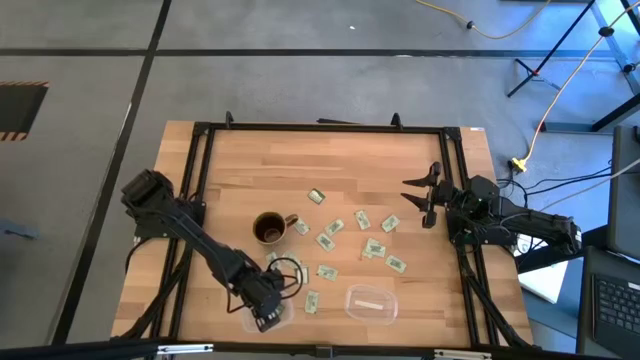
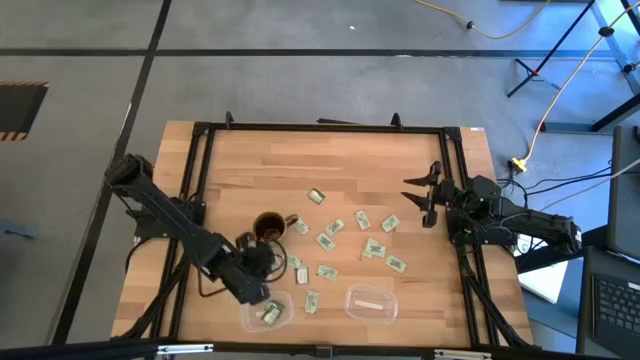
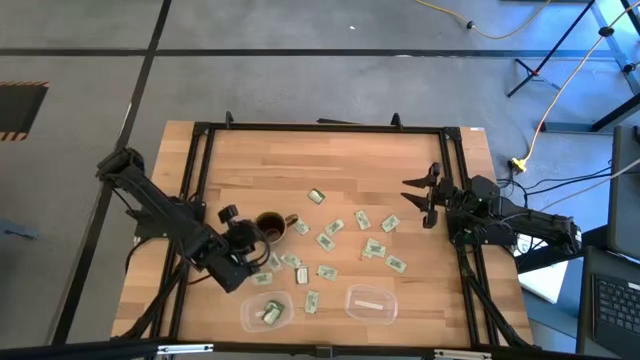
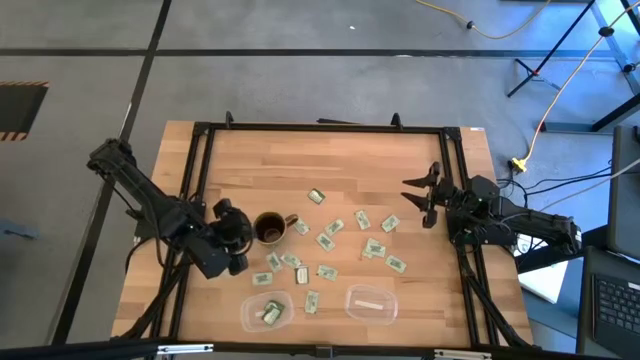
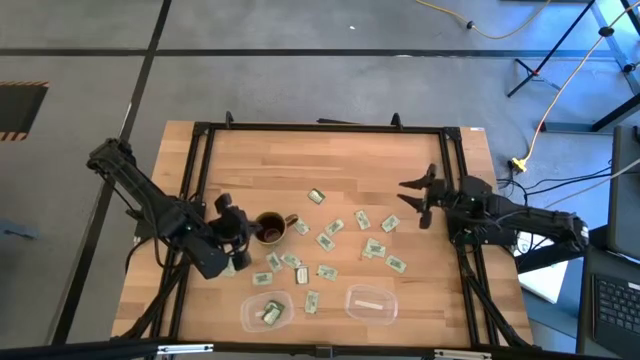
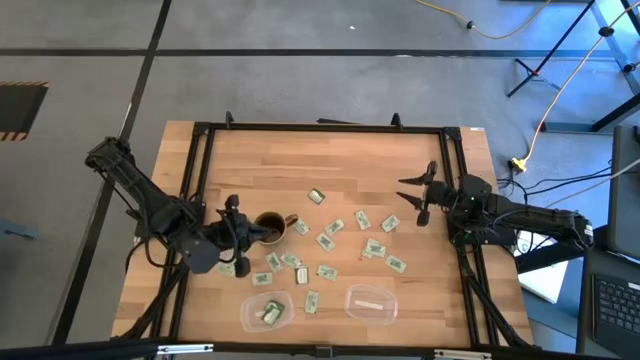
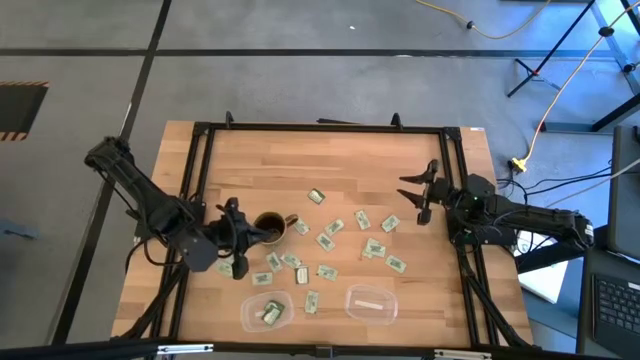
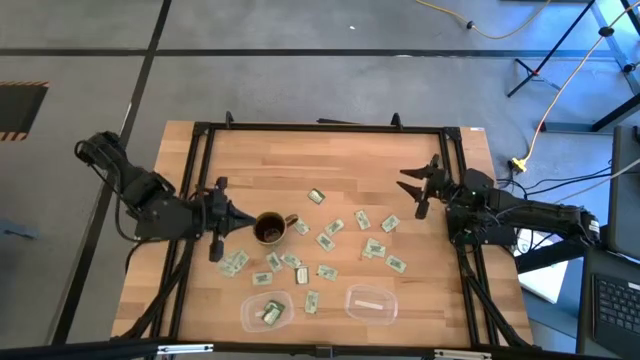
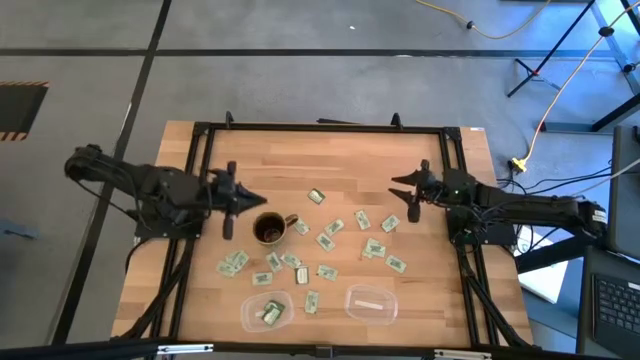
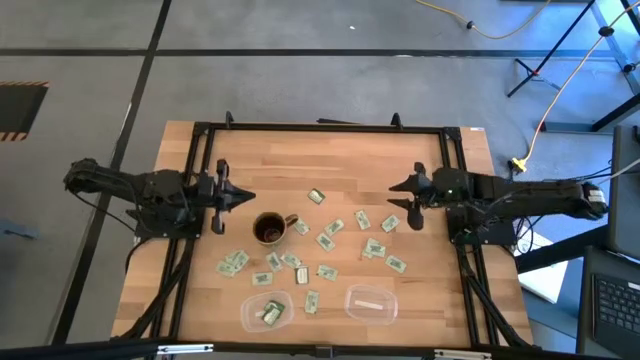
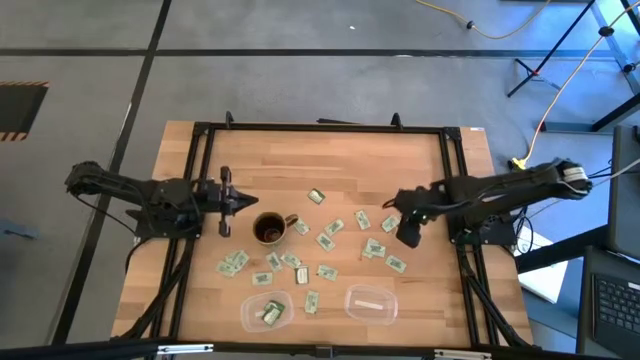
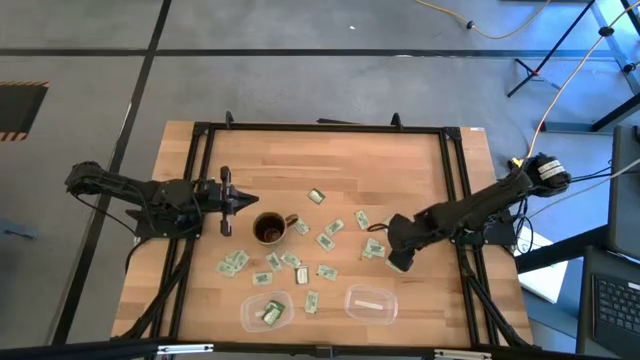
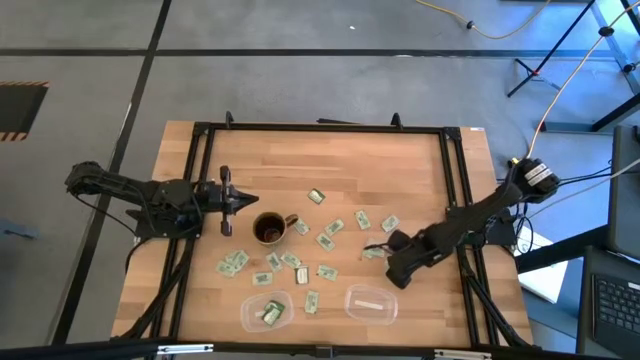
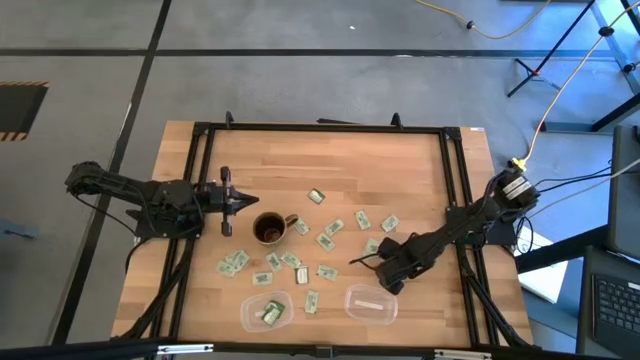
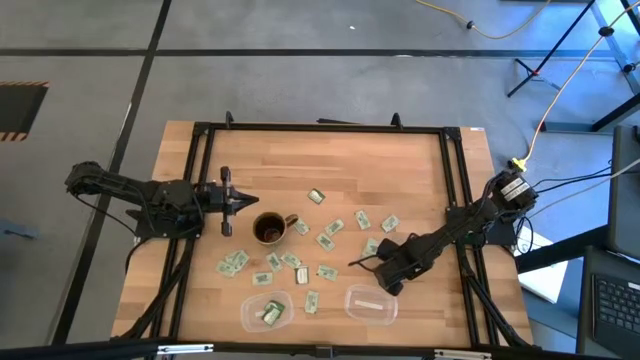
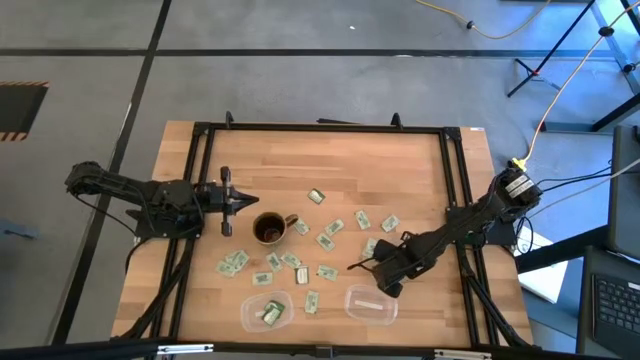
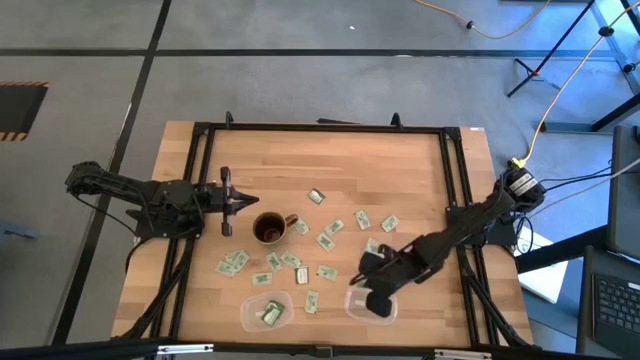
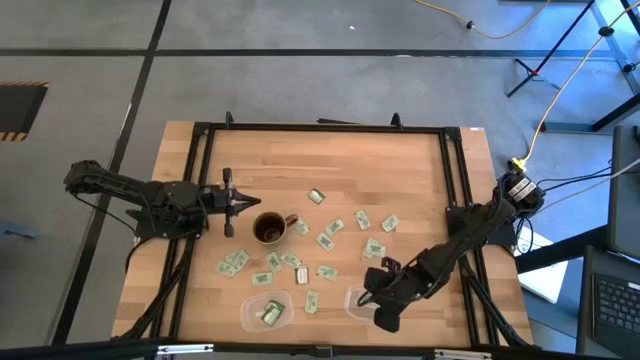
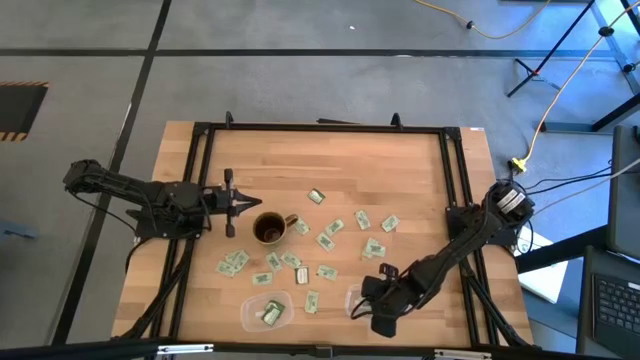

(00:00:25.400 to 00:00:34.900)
Task: Pick and place items into bin
Put the white stevia packet into the right transparent bin

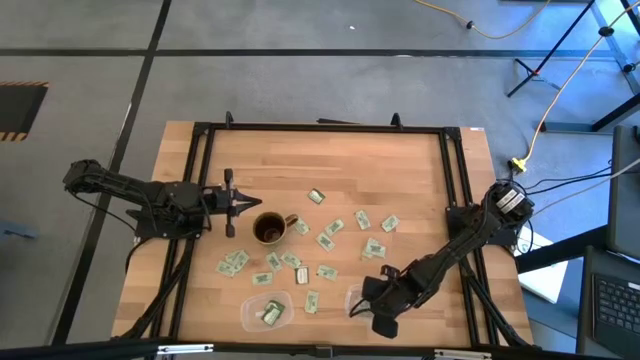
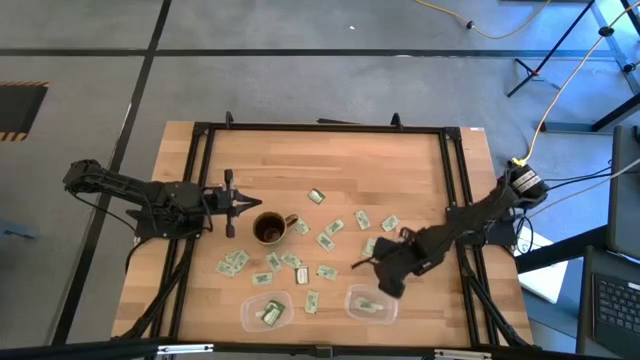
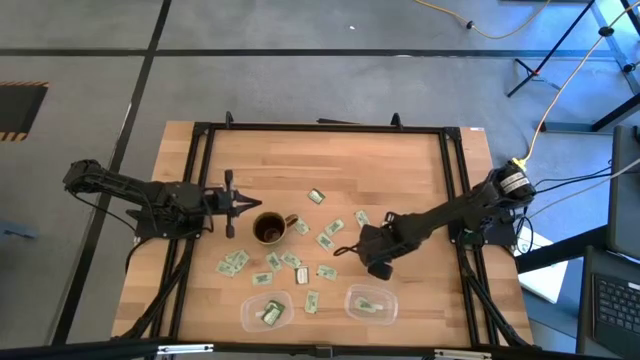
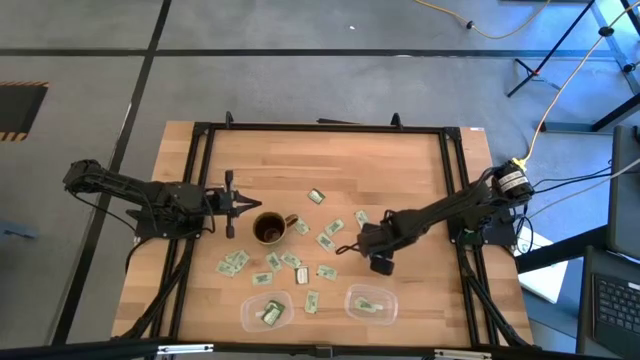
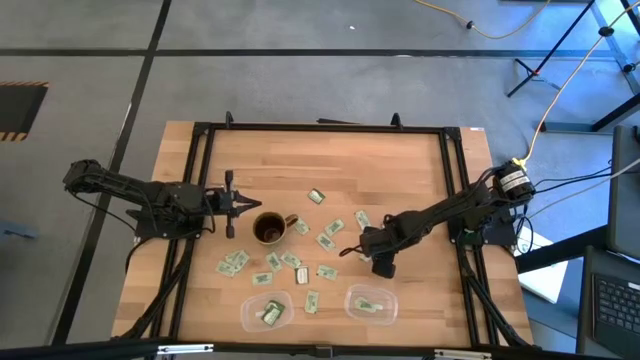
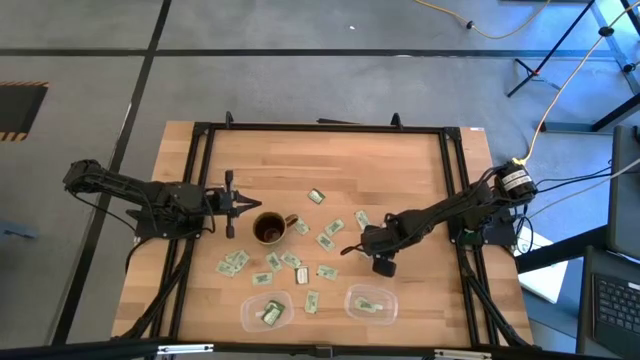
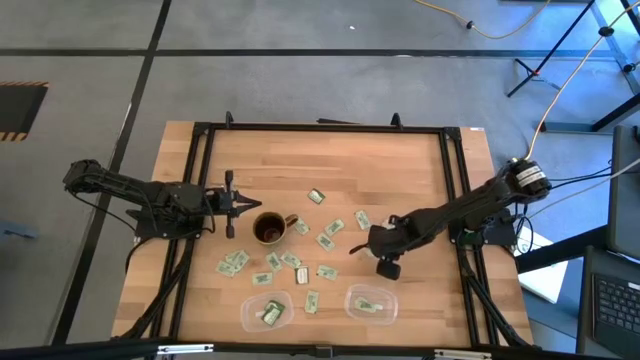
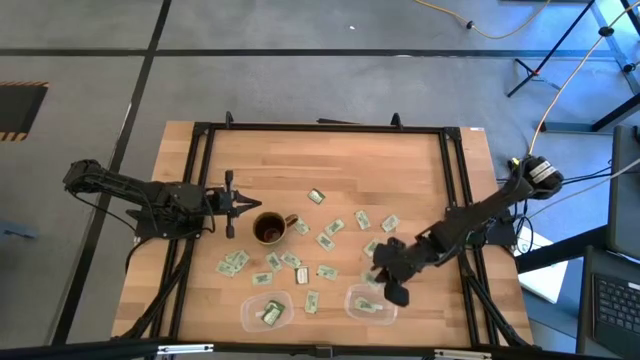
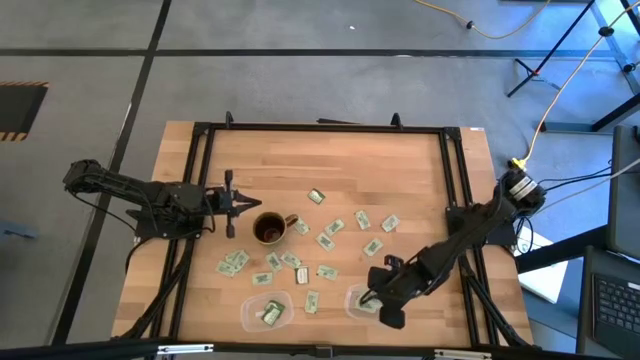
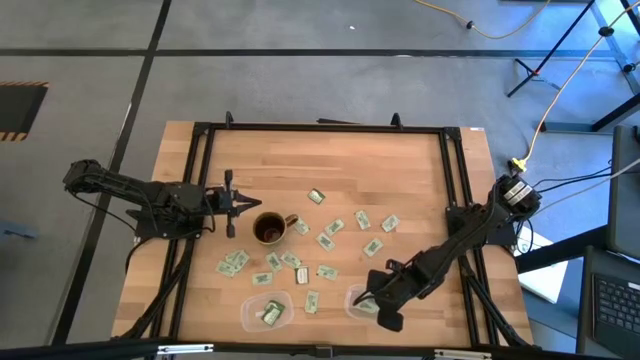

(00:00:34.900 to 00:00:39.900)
Put the white stevia packet into the right transparent bin

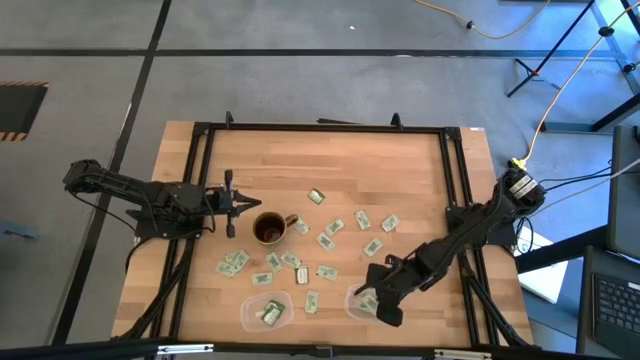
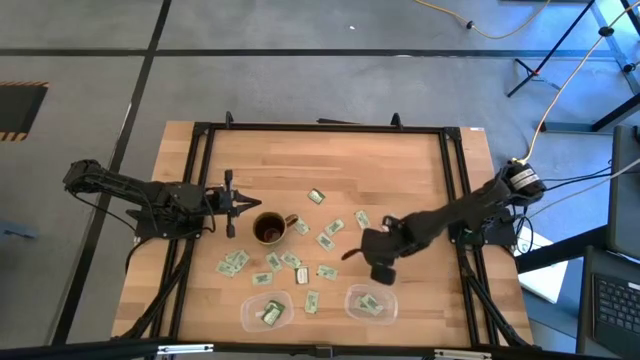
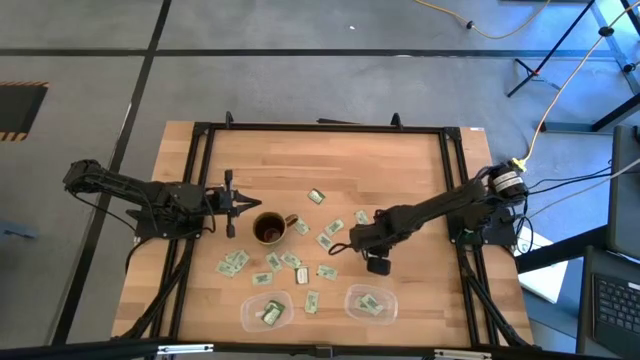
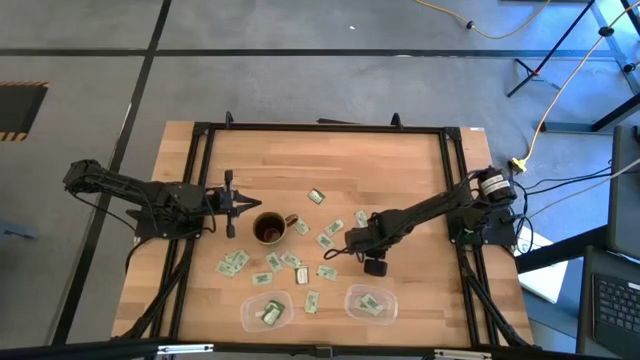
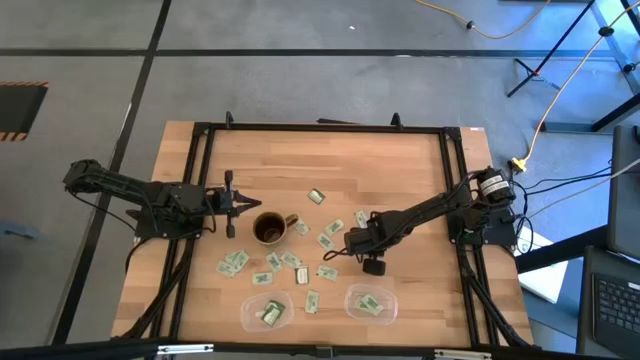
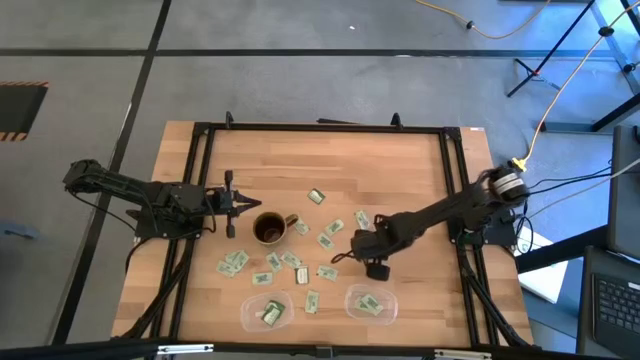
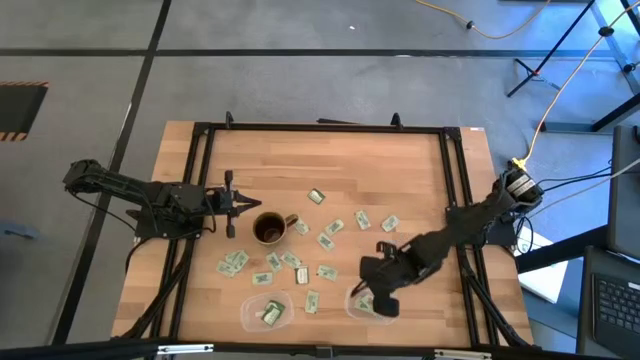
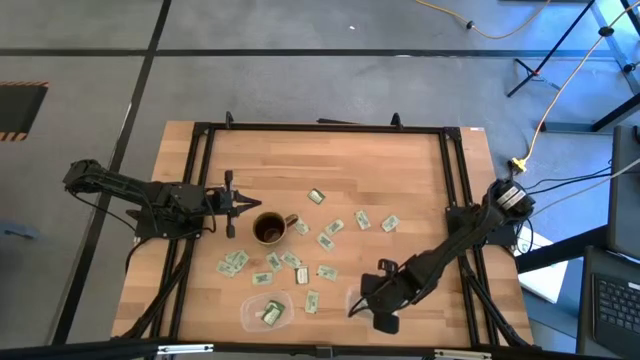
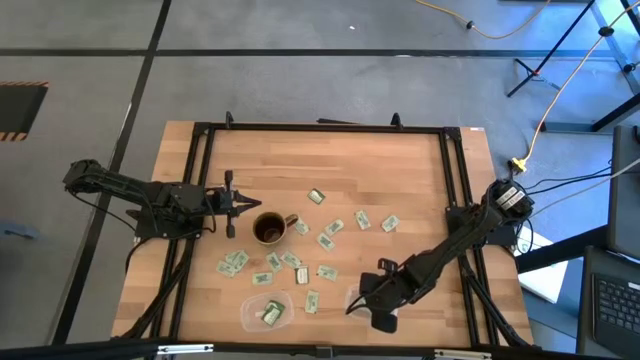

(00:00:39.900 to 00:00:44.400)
Put the white stevia packet into the right transparent bin

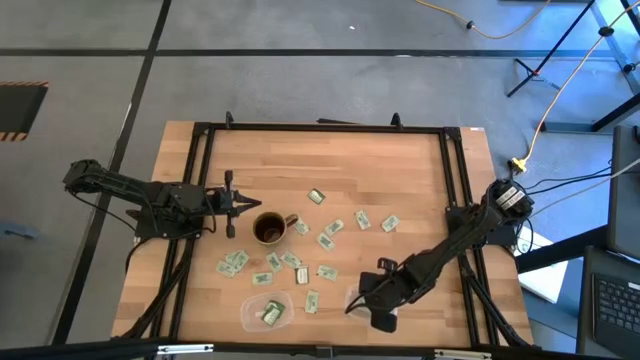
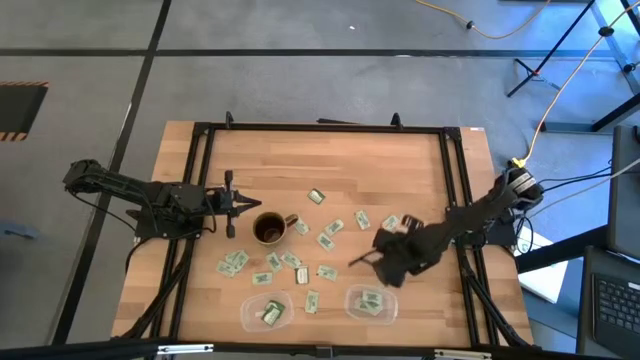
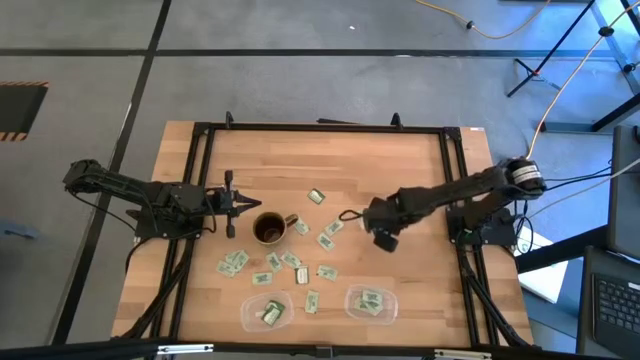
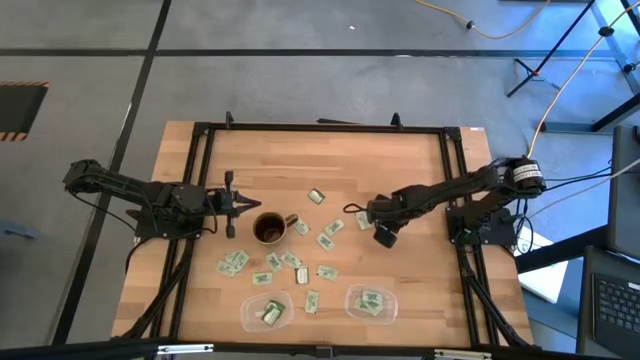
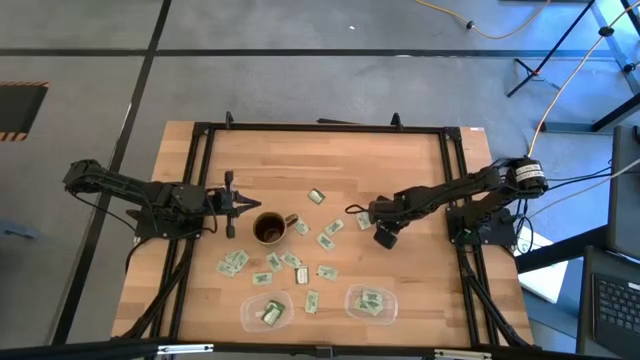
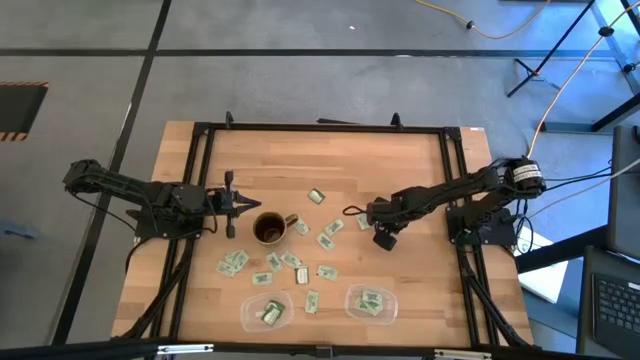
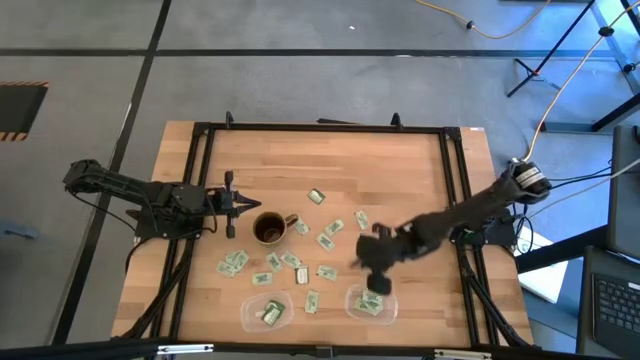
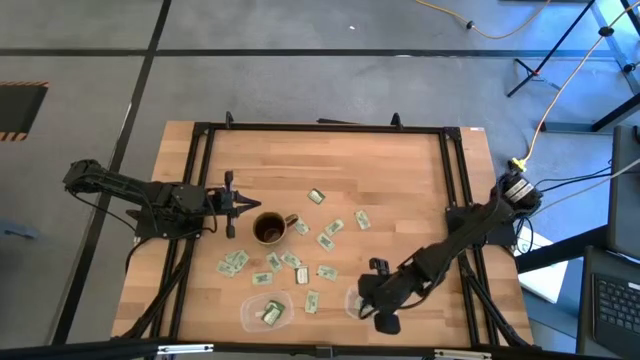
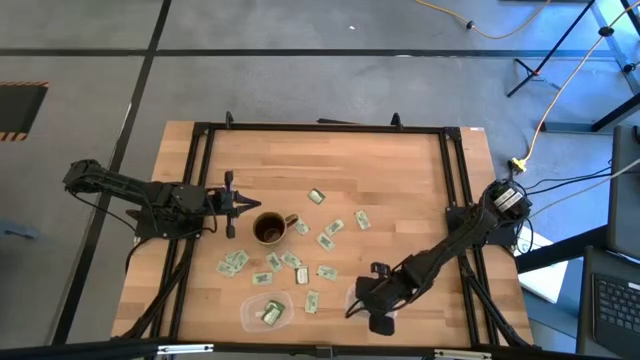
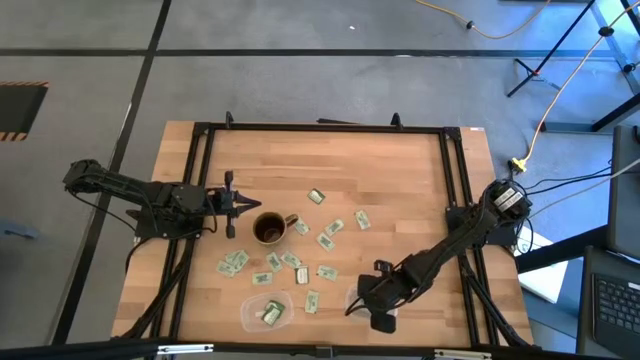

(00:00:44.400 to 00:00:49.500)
Put the white stevia packet into the right transparent bin
